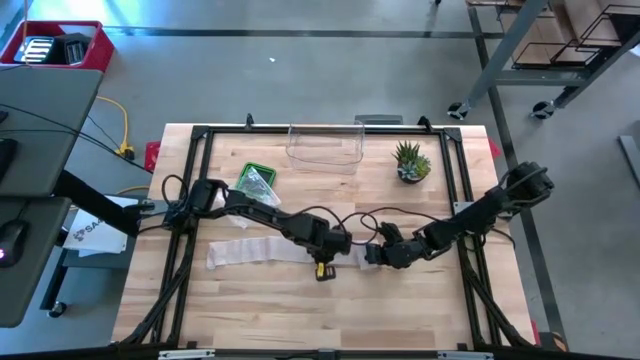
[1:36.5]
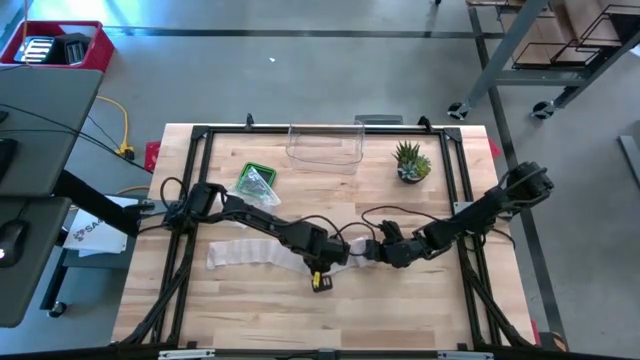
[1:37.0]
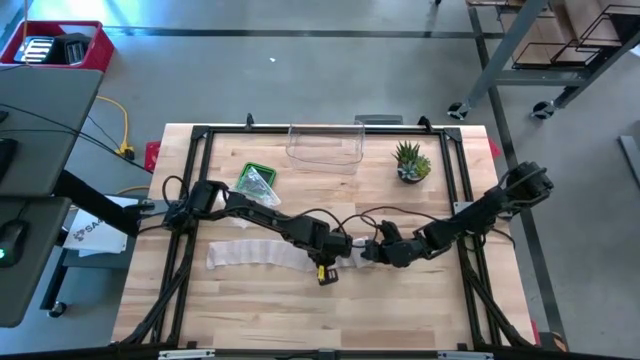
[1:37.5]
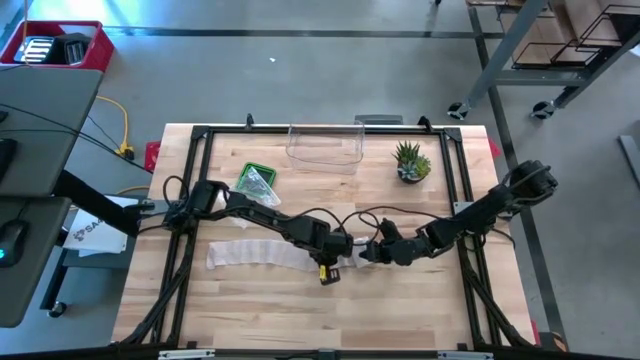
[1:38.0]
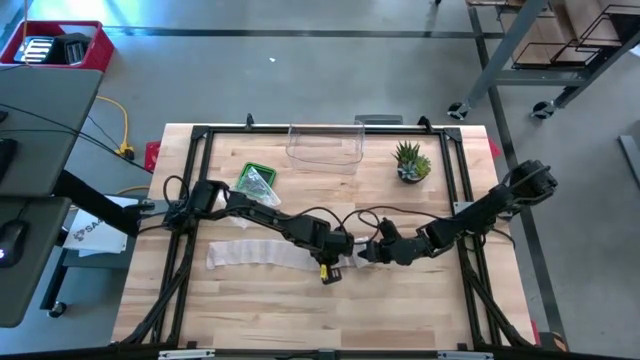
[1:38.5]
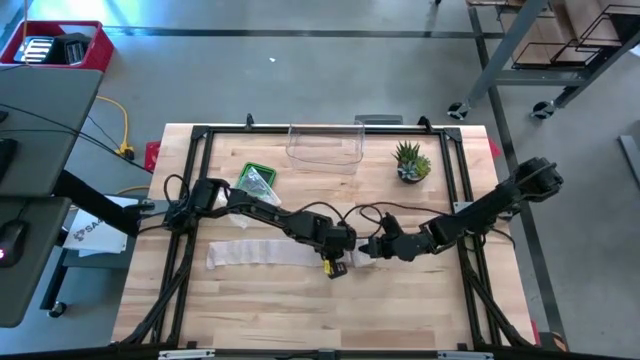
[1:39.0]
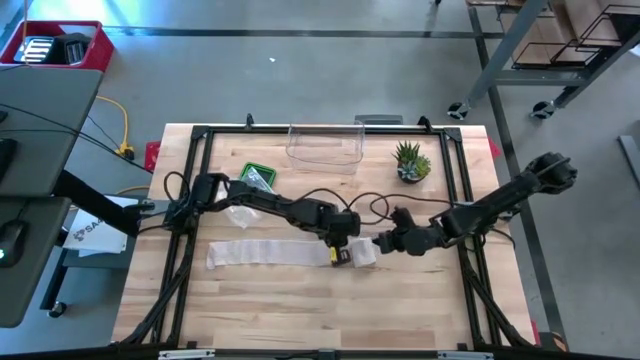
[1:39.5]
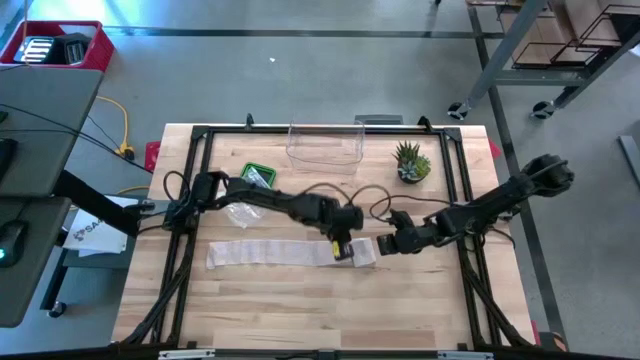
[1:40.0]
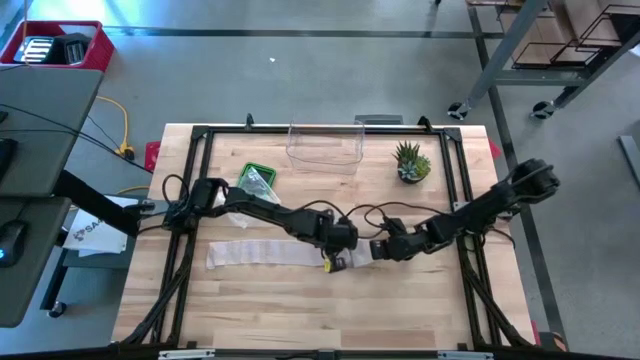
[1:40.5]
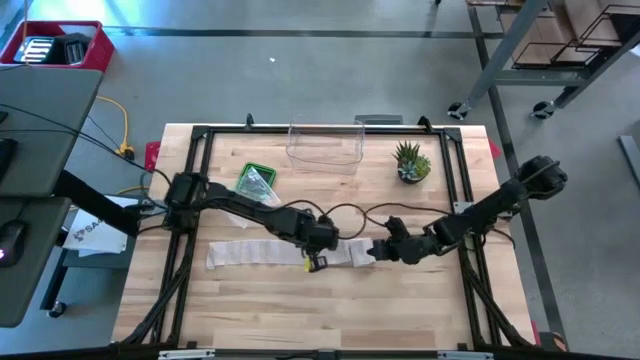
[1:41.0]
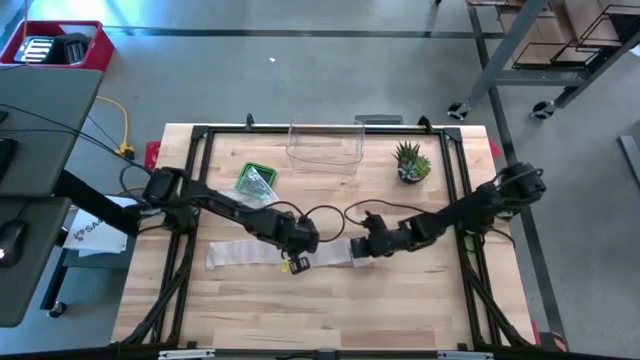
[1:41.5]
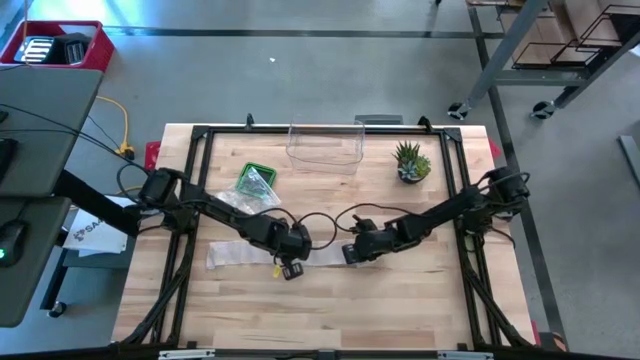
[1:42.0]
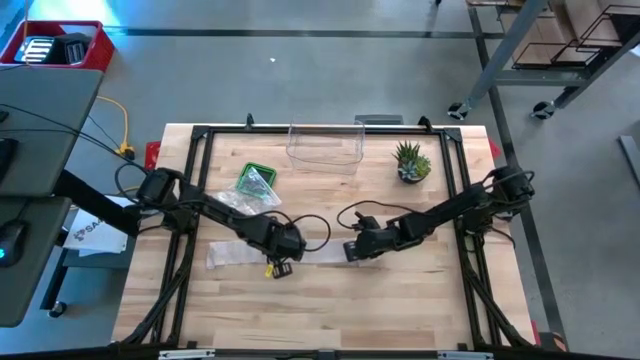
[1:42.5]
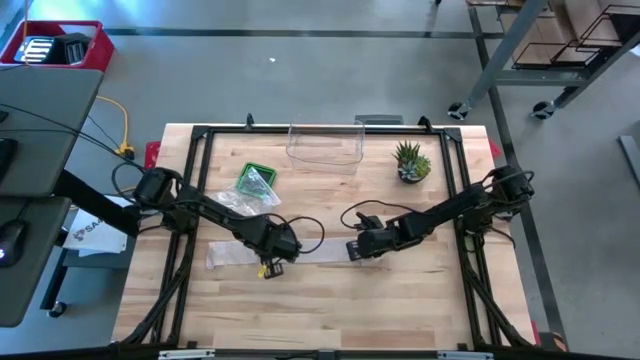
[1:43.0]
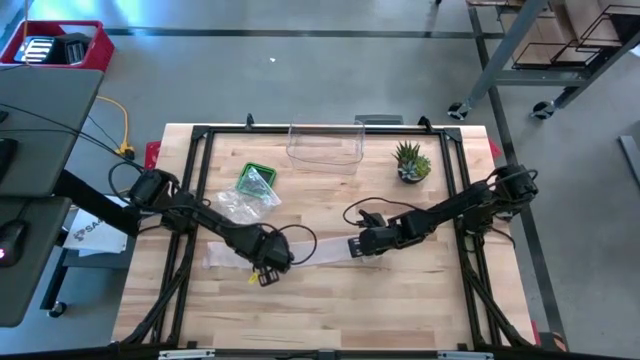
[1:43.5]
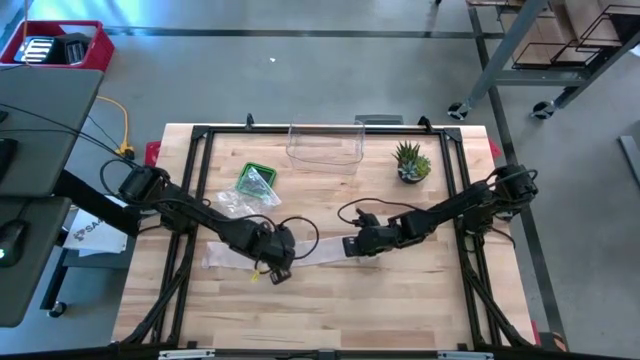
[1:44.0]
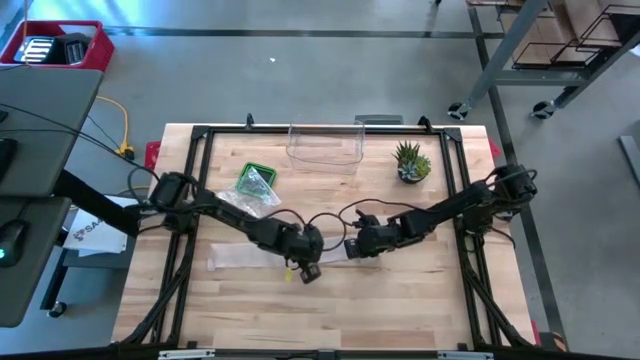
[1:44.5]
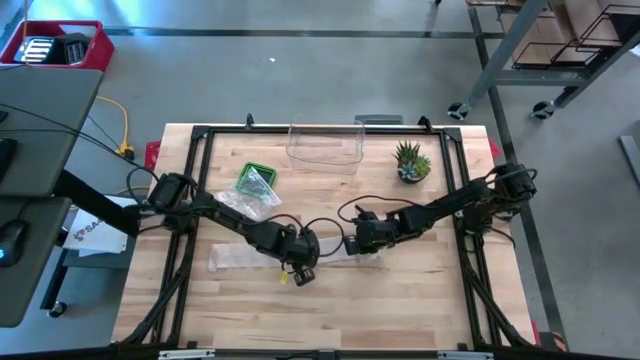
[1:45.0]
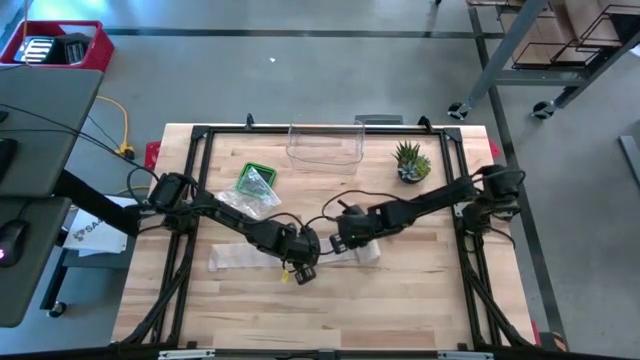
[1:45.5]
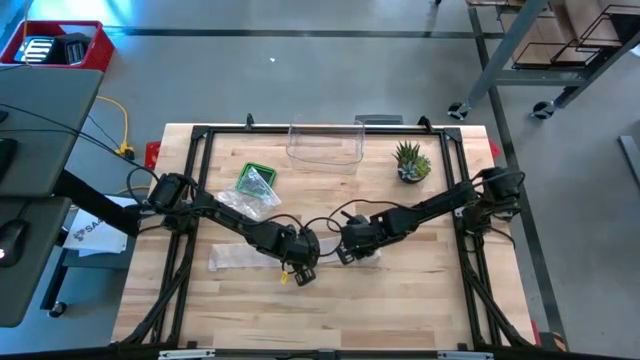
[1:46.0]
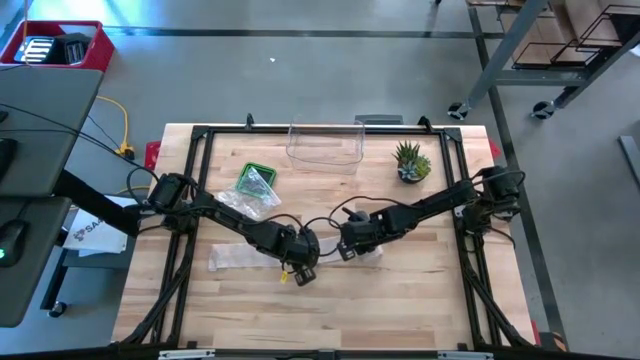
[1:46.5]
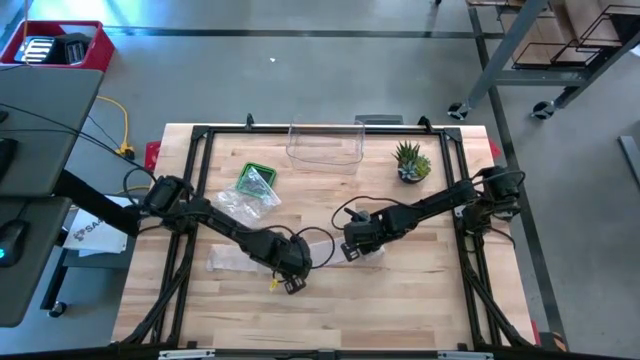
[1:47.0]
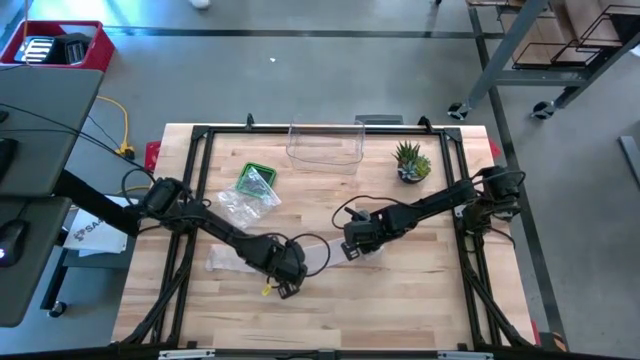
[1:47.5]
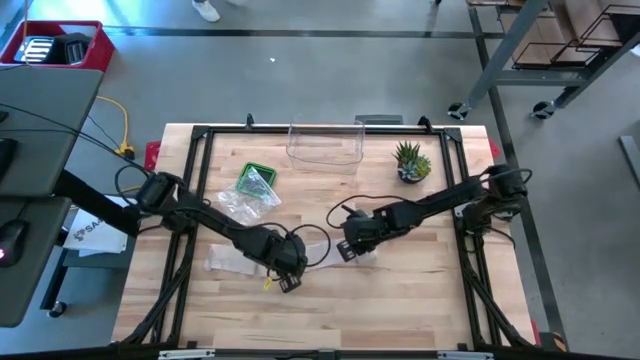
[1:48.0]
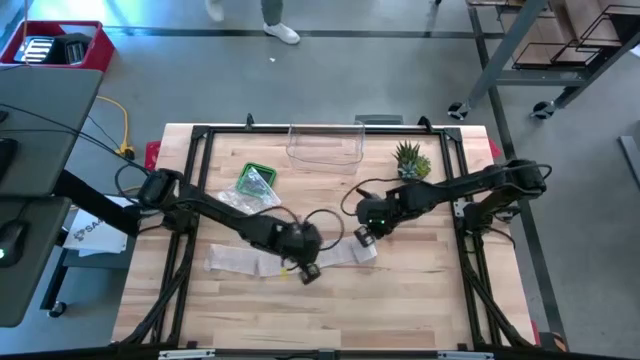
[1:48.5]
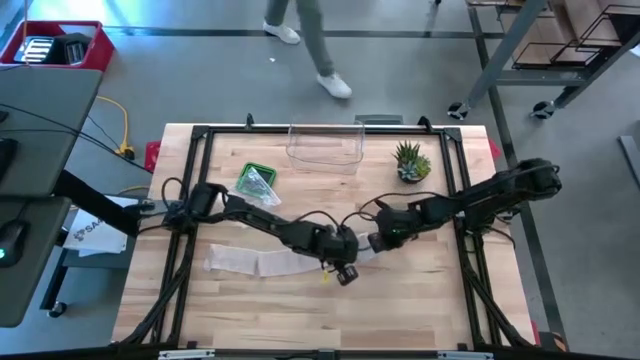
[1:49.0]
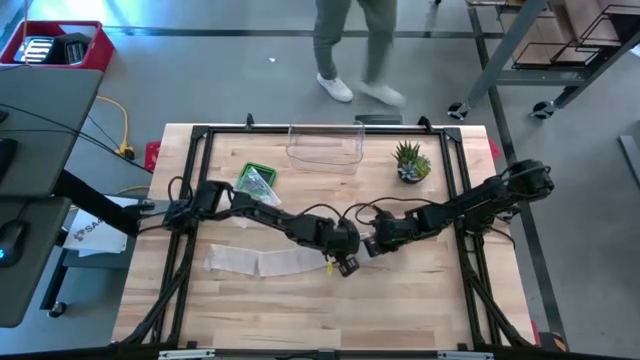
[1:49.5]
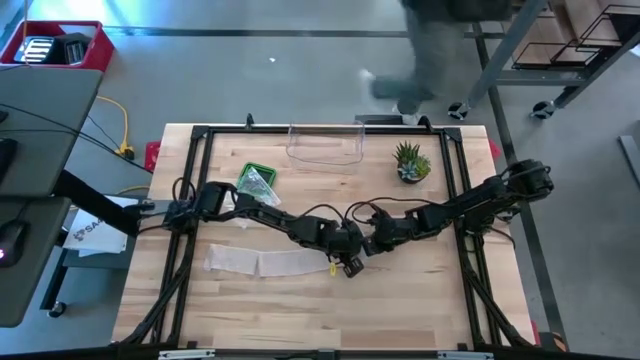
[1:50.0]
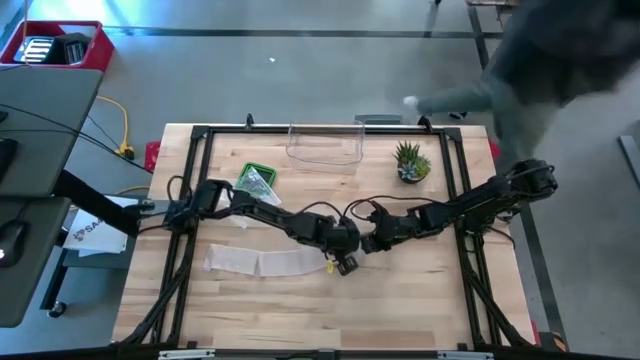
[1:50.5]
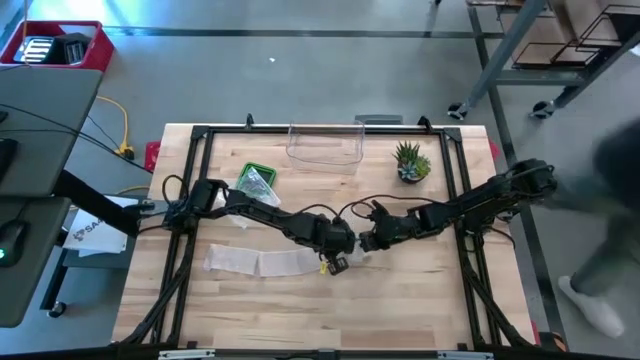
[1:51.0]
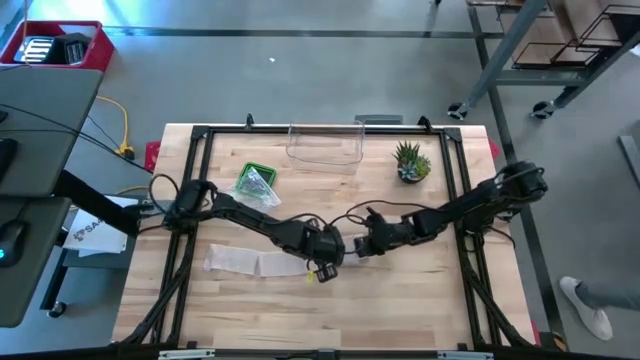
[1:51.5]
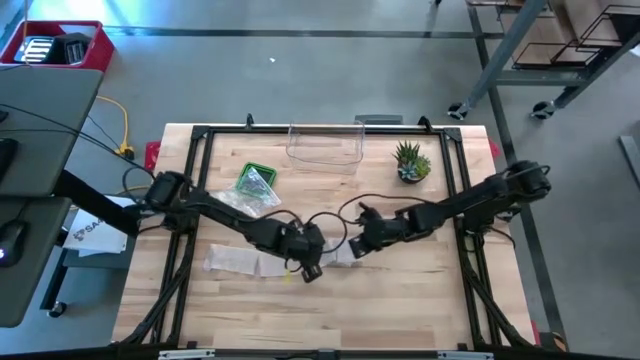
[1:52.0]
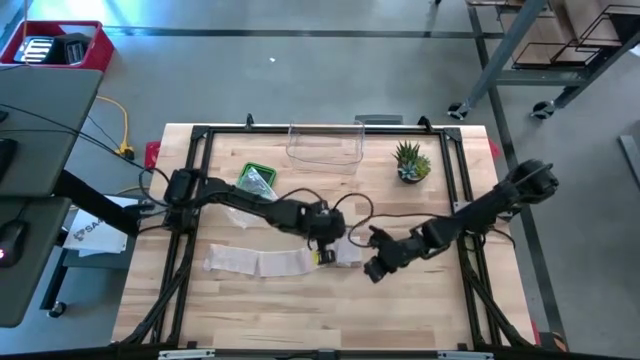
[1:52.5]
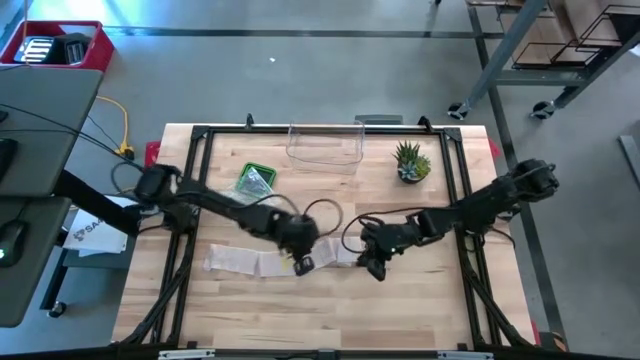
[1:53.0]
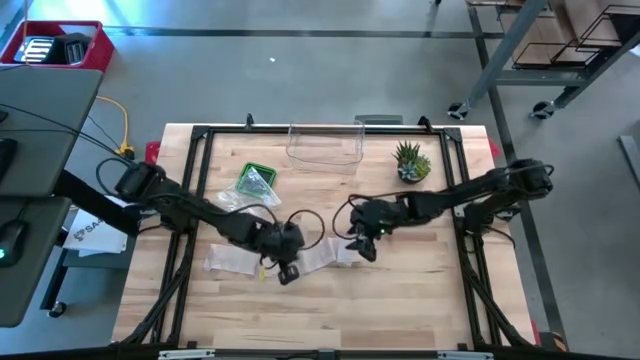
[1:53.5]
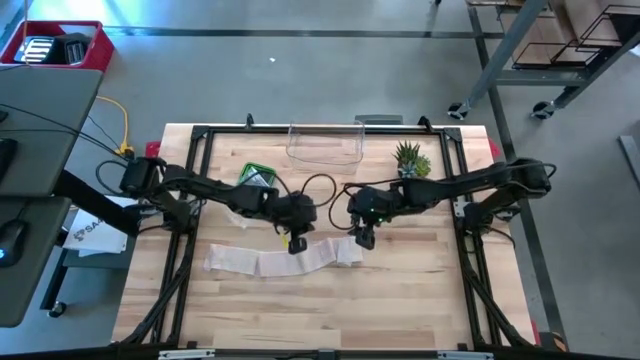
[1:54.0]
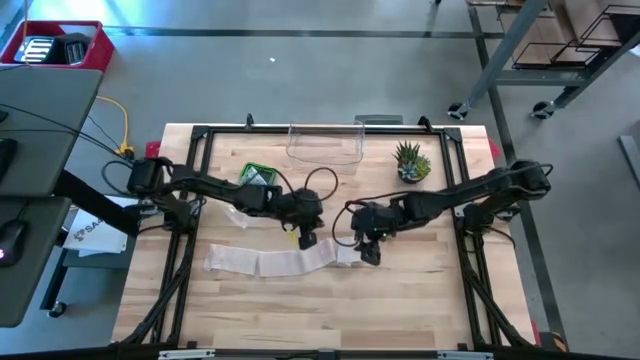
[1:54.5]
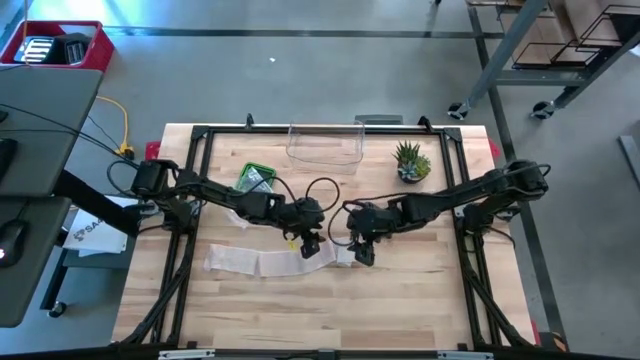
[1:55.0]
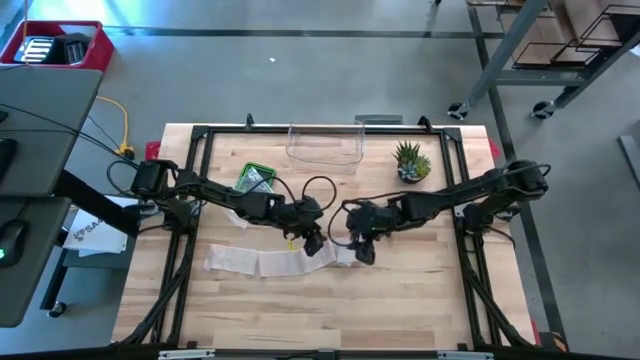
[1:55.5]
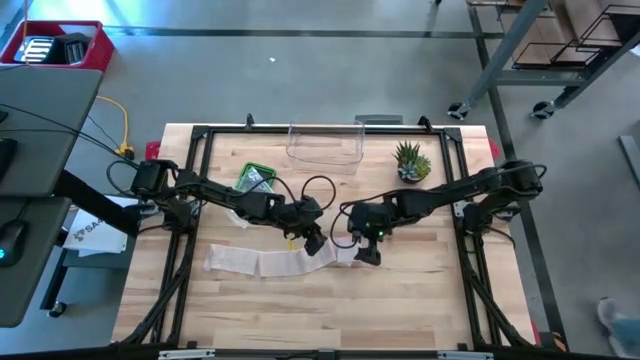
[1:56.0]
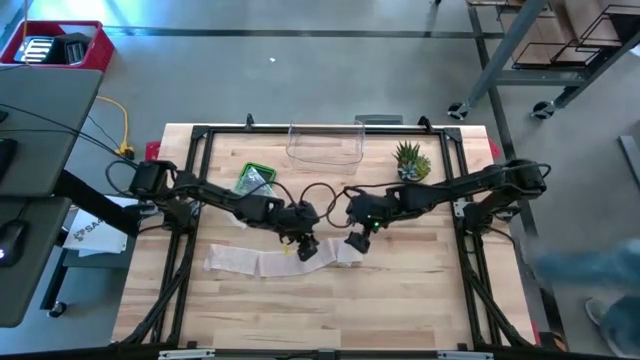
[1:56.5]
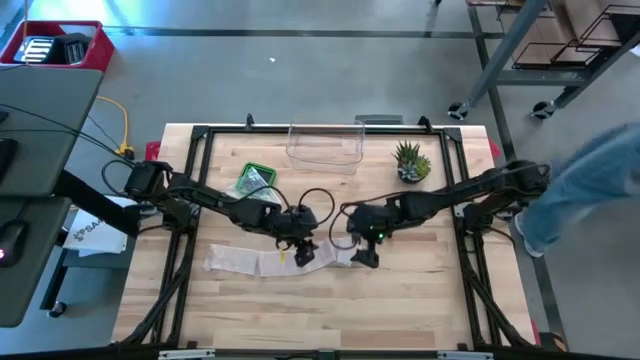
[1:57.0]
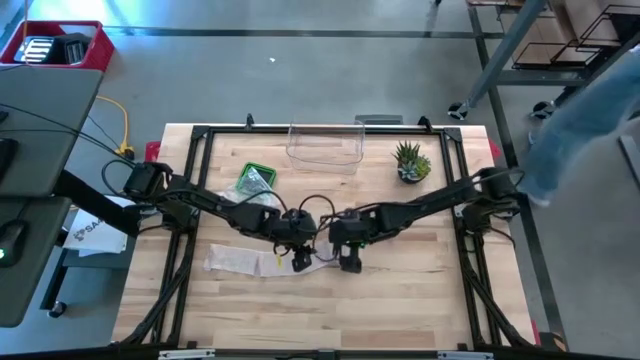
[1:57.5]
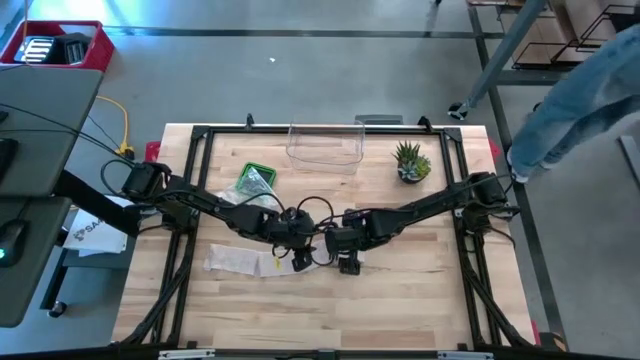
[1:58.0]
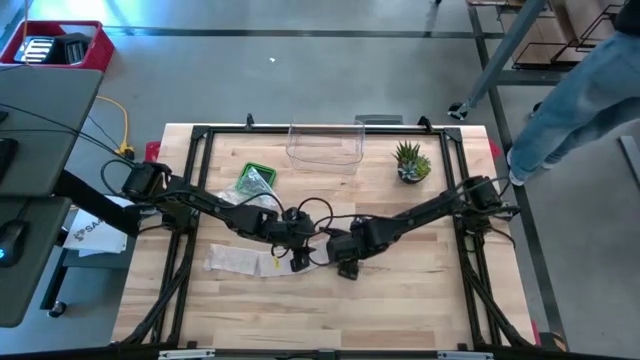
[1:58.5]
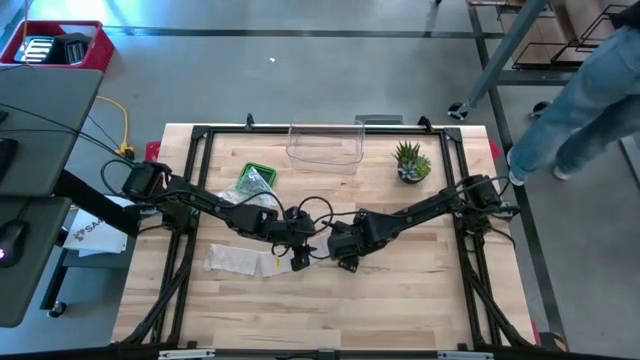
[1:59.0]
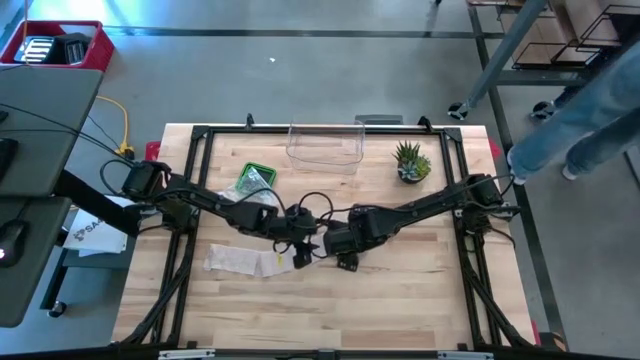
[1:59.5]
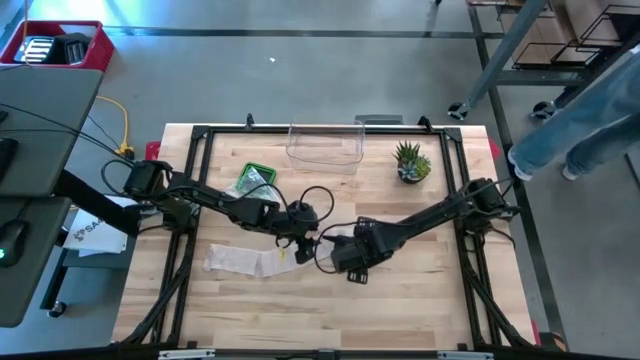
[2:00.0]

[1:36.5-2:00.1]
Task: Roll bandage
Roll the bandage
